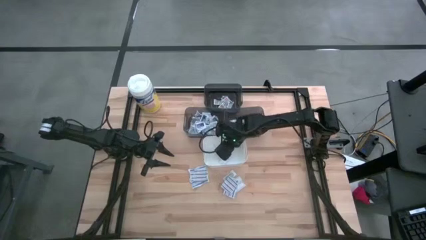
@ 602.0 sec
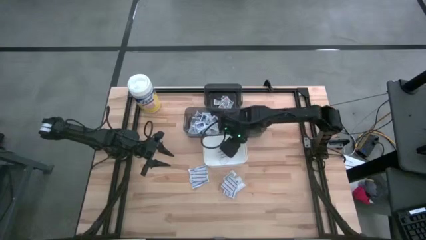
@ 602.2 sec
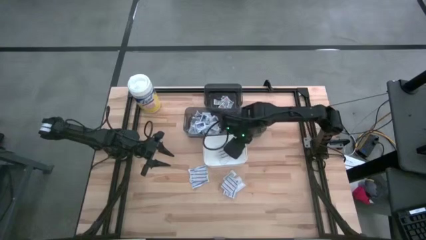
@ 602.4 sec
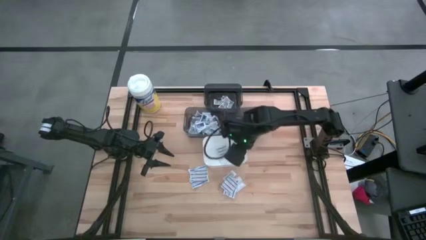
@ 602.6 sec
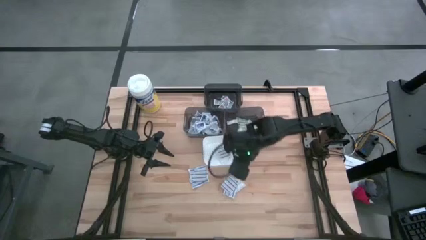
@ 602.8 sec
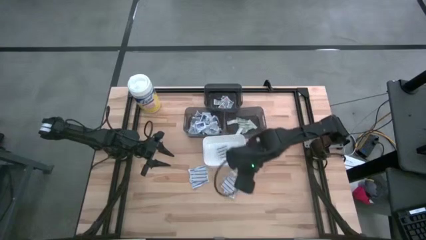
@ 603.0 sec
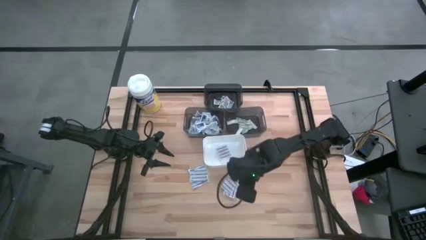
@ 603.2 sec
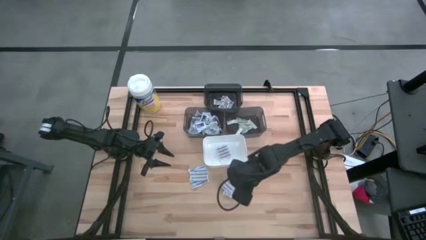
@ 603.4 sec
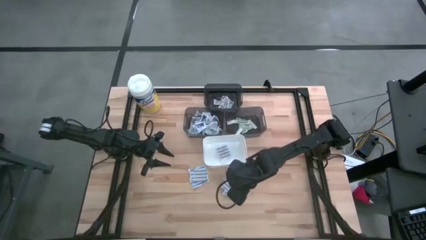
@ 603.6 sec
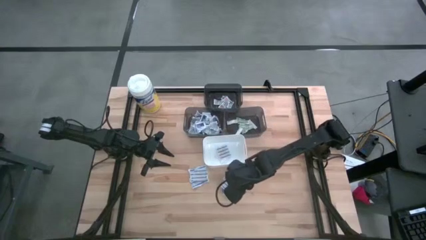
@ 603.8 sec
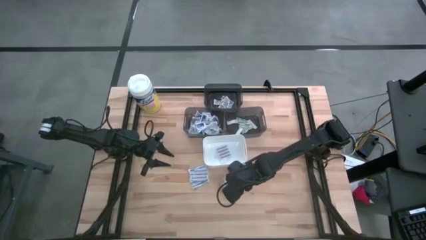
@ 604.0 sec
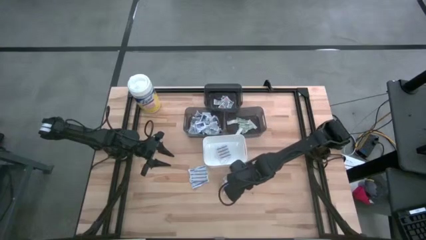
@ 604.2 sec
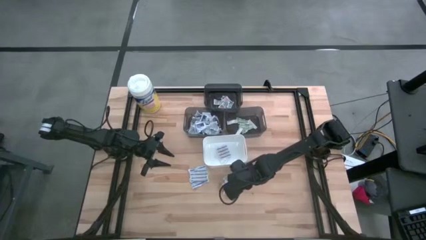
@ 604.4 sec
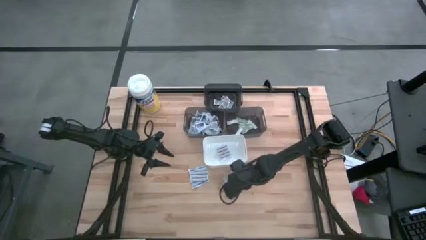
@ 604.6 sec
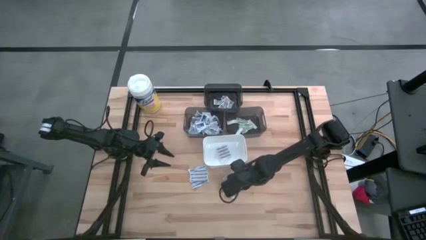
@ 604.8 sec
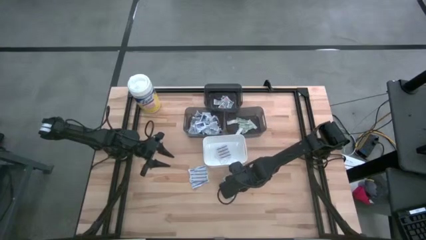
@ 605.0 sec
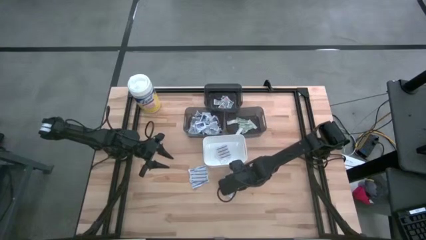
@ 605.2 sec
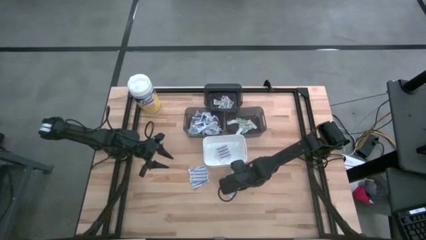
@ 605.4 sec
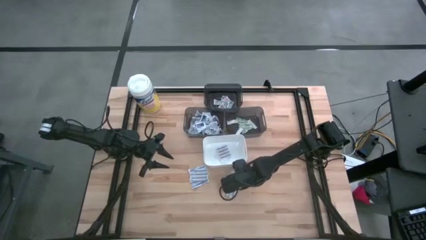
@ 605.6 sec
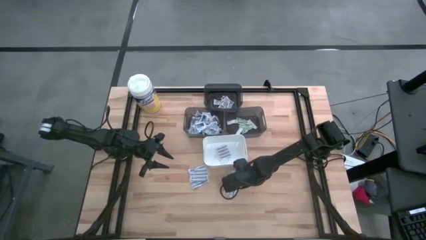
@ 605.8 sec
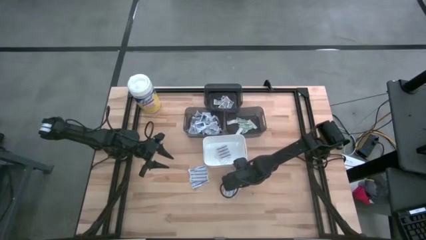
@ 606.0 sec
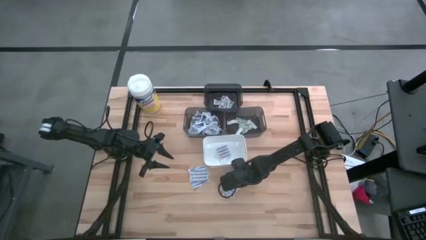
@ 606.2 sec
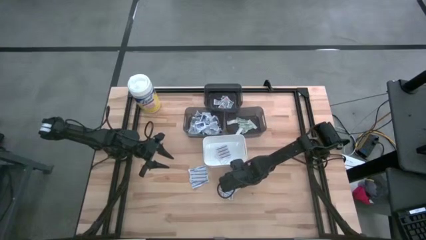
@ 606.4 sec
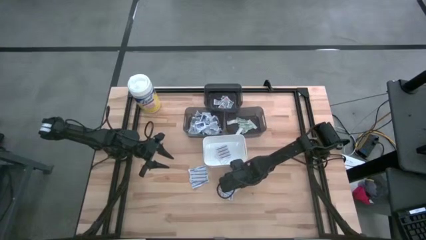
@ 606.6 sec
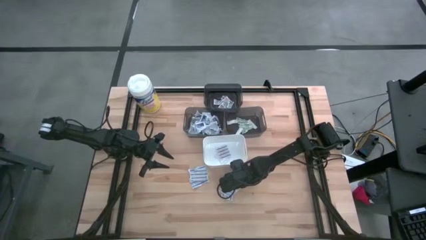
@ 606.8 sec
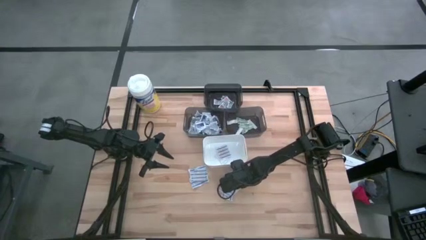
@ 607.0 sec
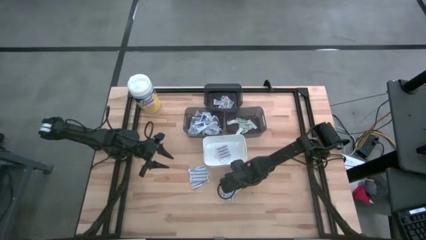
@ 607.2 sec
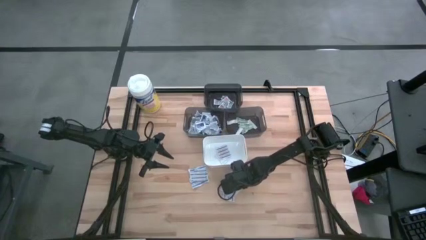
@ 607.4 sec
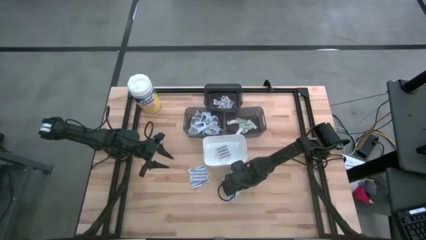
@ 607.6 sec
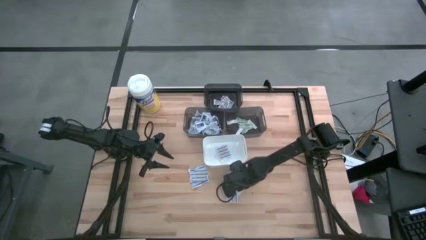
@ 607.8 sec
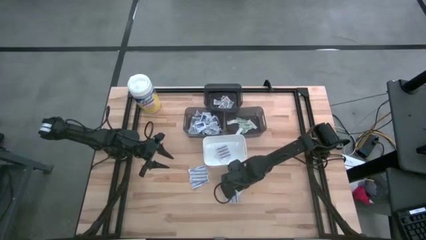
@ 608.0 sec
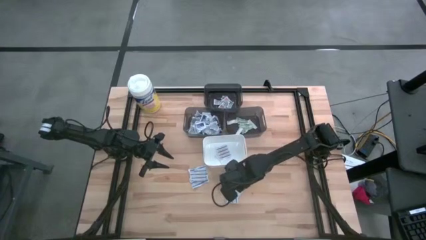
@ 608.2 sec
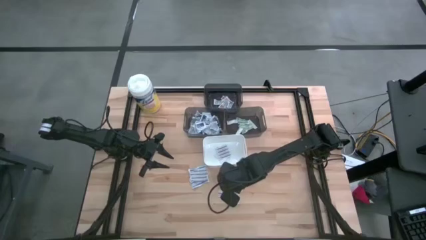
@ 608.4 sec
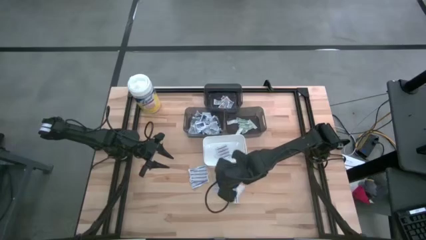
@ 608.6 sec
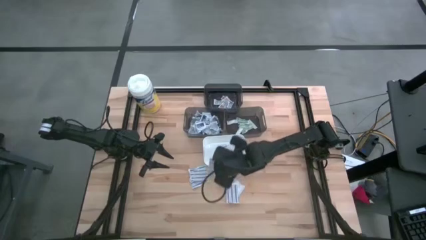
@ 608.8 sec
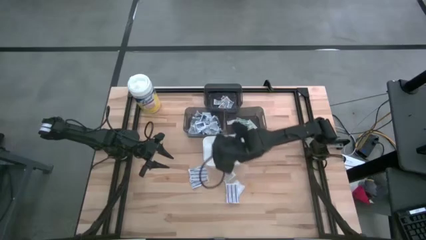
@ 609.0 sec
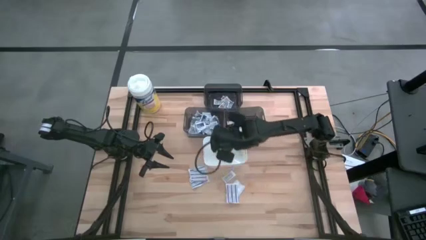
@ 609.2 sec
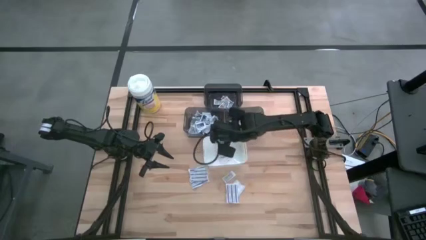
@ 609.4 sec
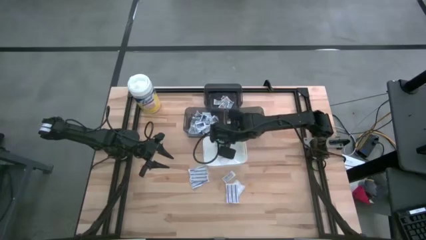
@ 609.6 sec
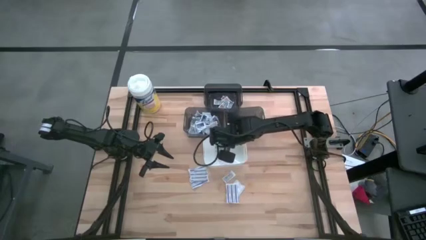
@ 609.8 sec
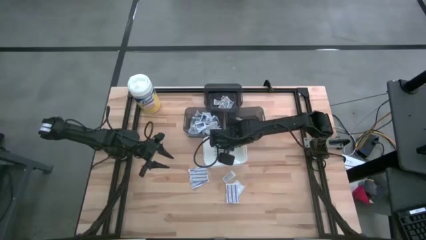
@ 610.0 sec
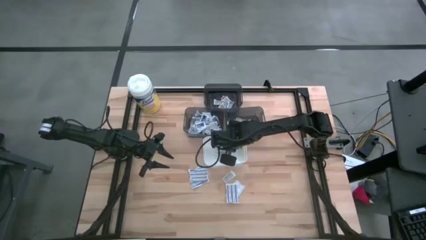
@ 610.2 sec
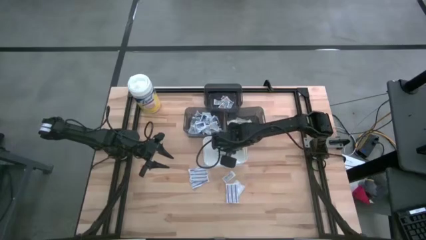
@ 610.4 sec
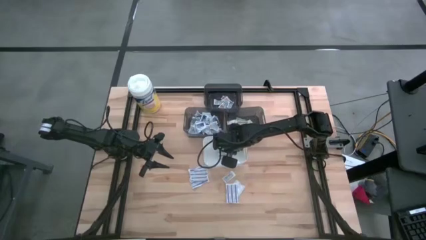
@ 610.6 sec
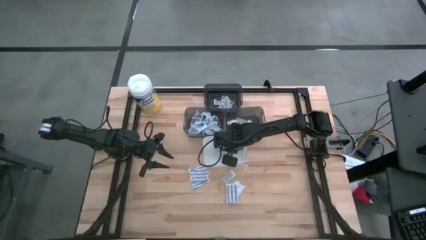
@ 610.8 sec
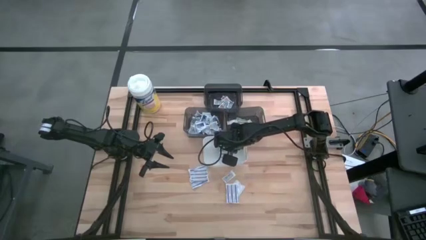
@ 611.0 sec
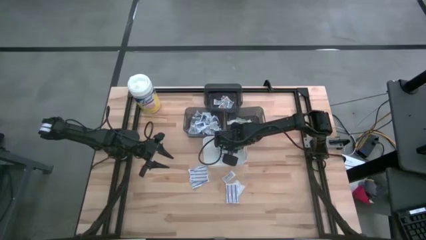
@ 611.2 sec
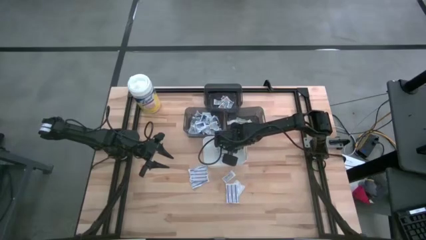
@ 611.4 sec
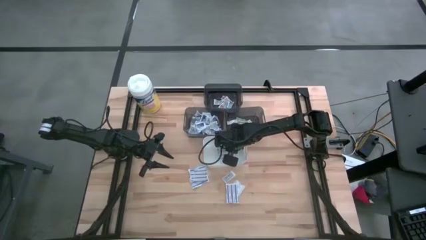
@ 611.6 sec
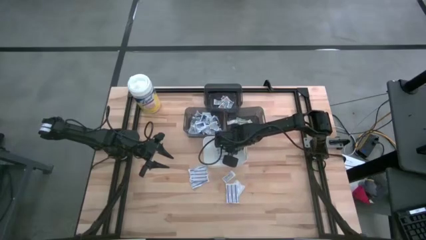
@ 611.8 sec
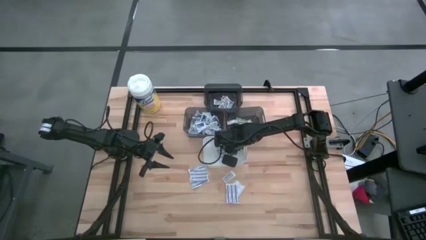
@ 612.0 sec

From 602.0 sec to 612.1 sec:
Task: Pick & Place First Aid Supplies
Put the blue bandage into the white bin

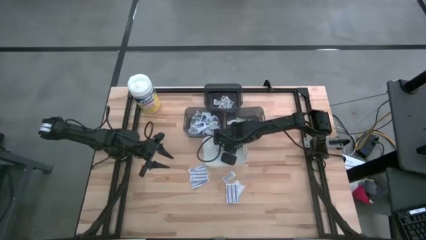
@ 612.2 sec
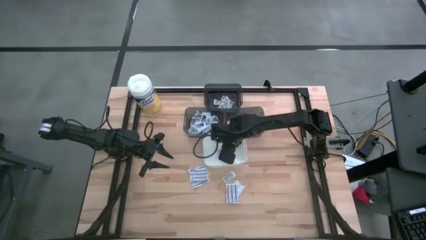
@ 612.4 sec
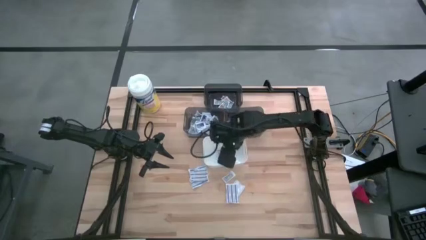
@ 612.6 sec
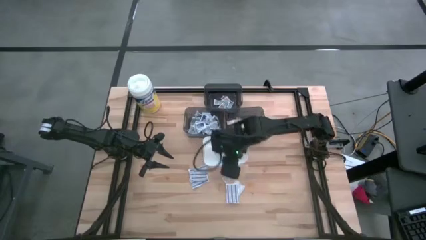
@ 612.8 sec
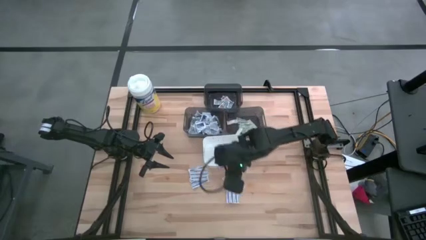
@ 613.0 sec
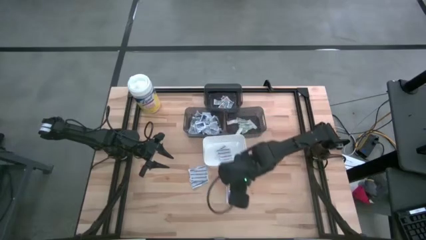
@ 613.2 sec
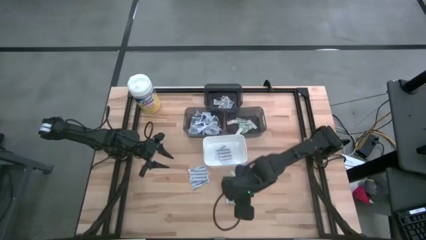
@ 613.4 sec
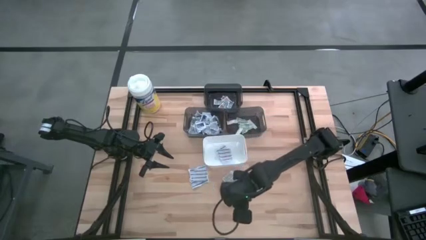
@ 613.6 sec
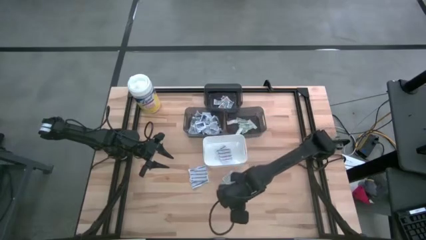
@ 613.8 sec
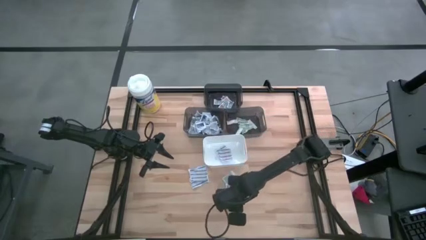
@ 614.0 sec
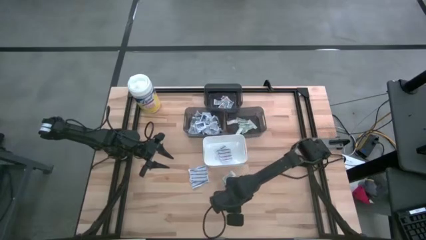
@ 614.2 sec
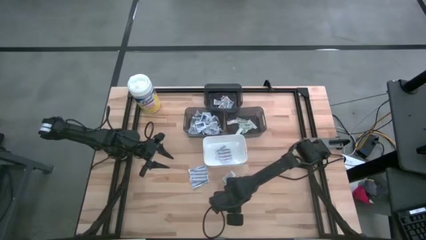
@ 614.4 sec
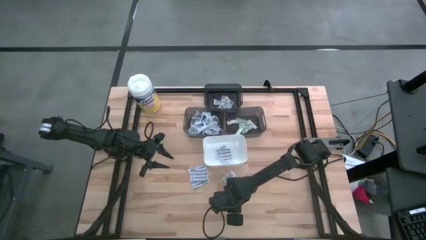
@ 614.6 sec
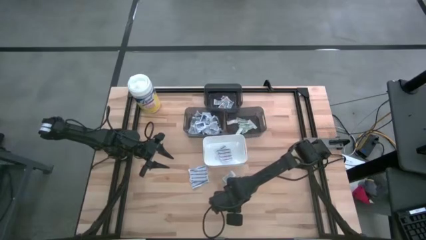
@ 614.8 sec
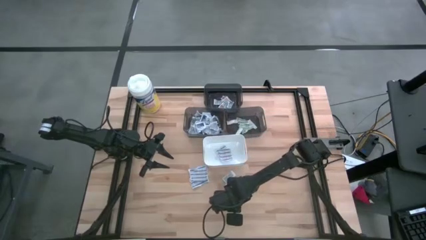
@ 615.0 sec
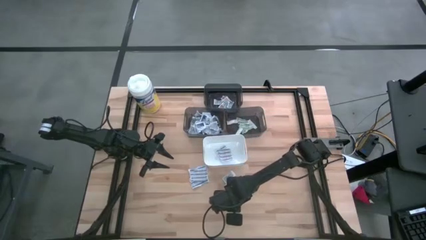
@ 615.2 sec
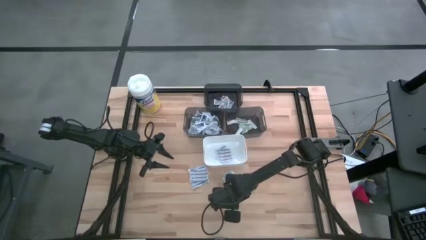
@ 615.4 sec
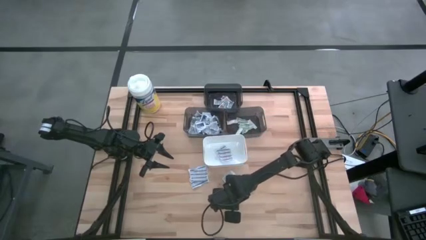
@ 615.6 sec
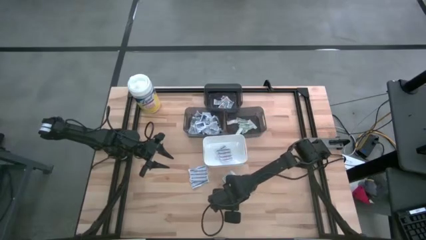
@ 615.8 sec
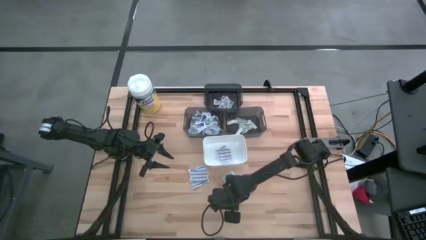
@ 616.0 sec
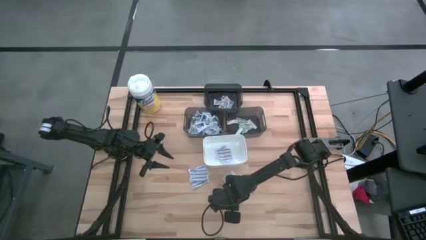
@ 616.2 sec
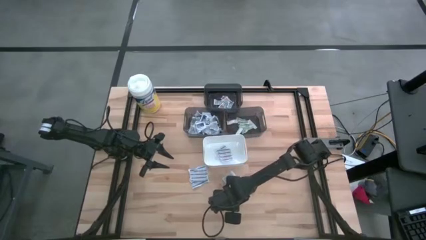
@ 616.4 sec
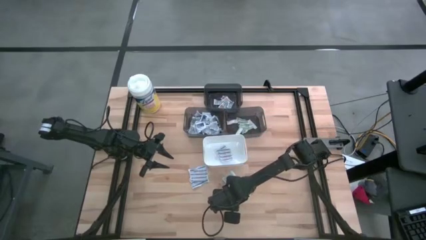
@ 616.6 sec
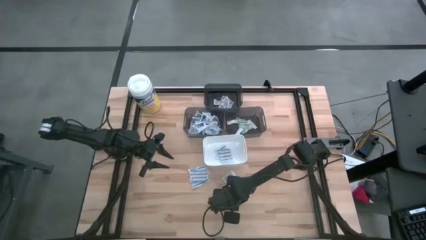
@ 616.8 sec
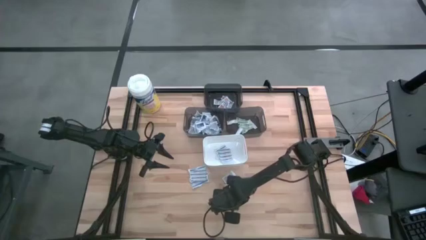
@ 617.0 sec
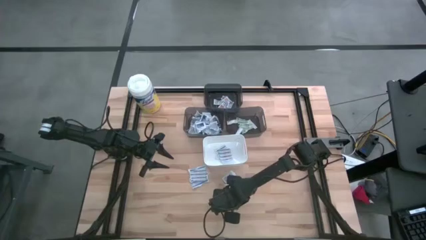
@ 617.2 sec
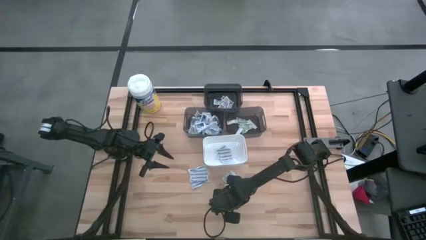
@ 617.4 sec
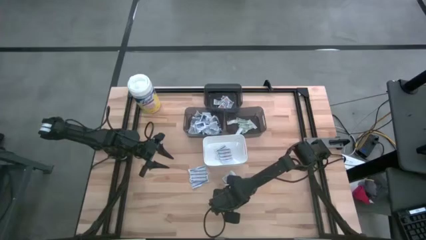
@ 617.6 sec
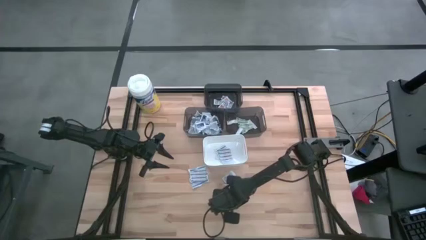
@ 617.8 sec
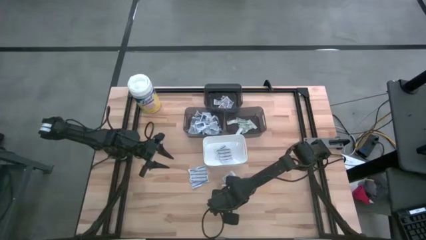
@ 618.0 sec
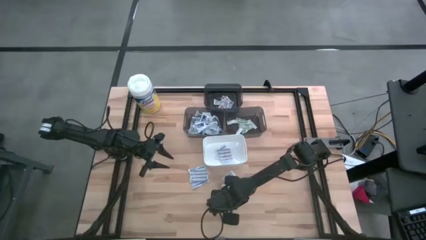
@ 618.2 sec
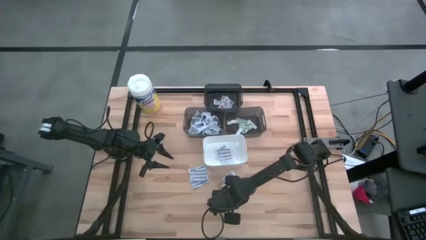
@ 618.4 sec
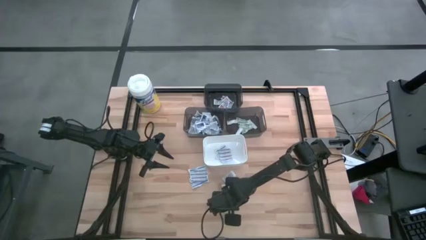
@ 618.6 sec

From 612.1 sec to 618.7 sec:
Put the blue bandage into the white bin
